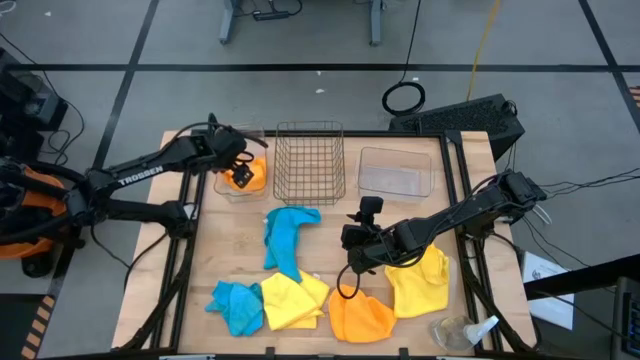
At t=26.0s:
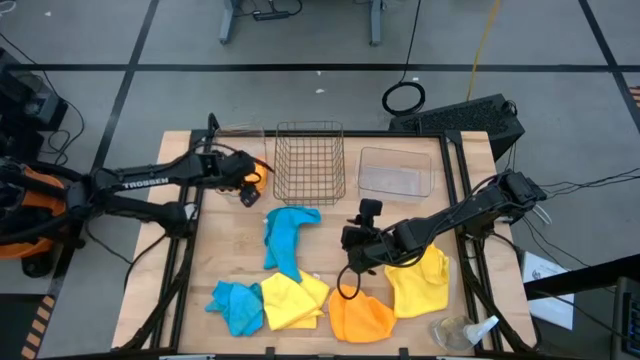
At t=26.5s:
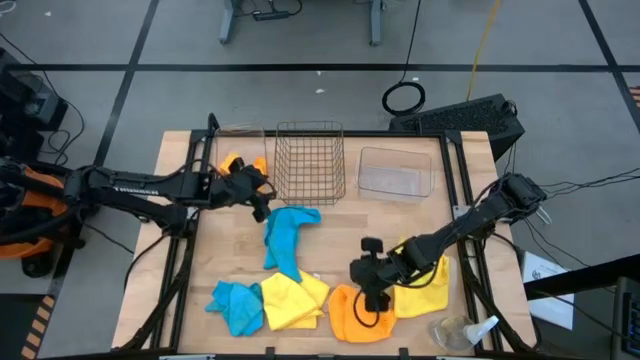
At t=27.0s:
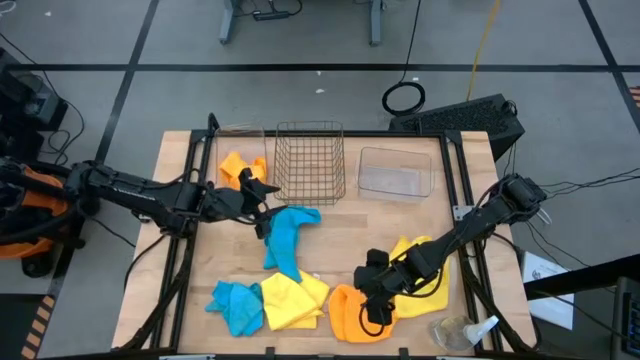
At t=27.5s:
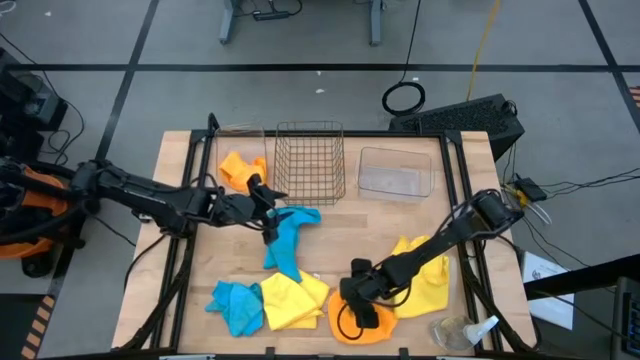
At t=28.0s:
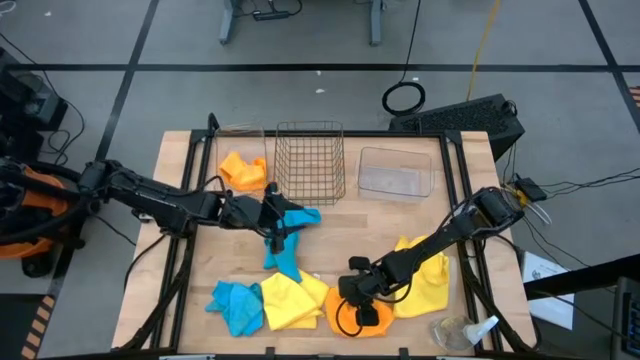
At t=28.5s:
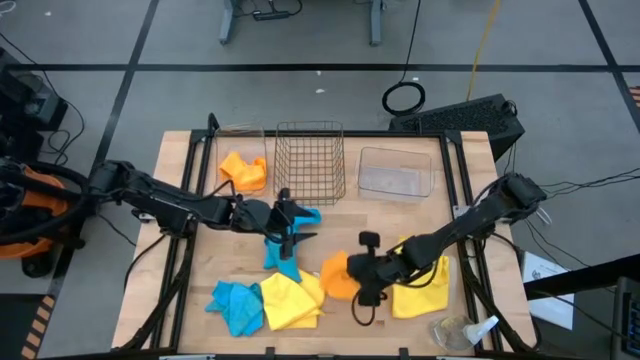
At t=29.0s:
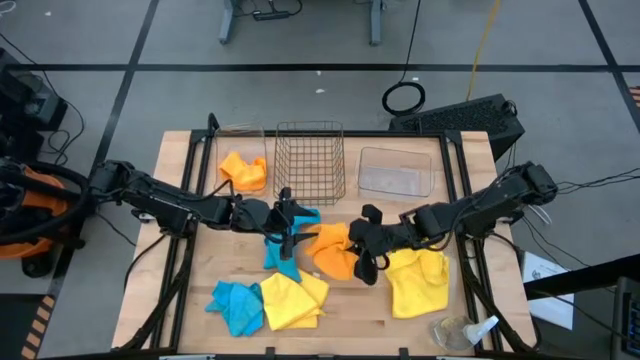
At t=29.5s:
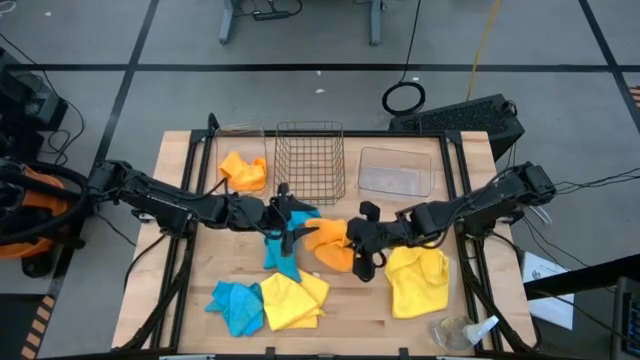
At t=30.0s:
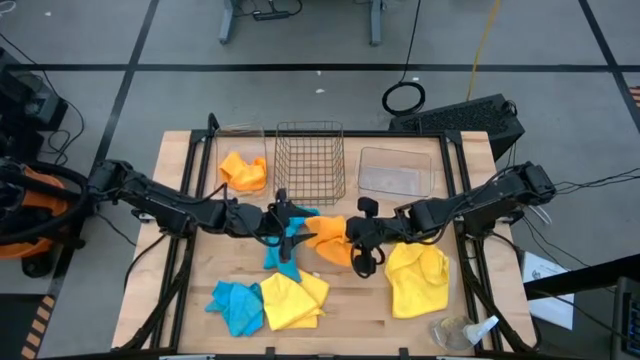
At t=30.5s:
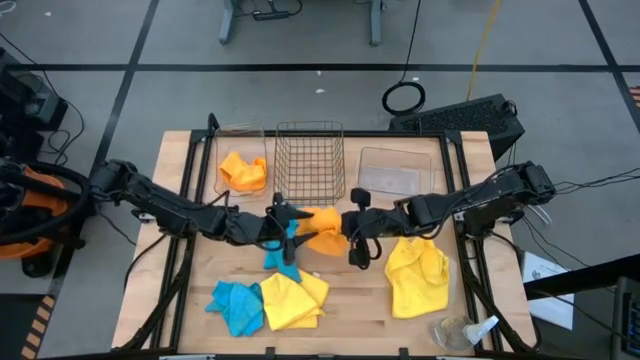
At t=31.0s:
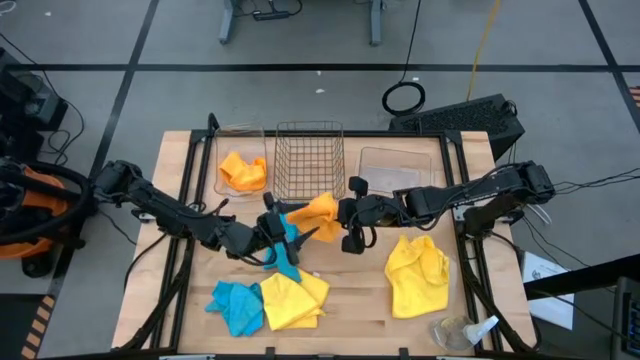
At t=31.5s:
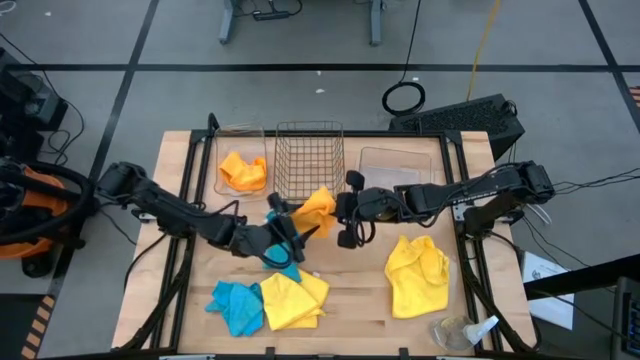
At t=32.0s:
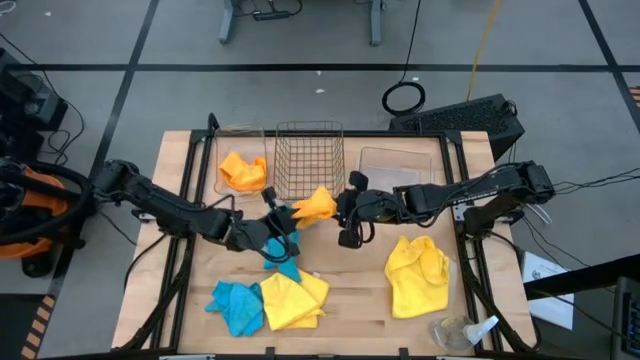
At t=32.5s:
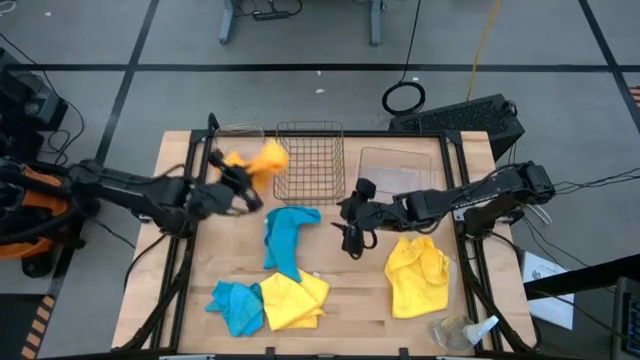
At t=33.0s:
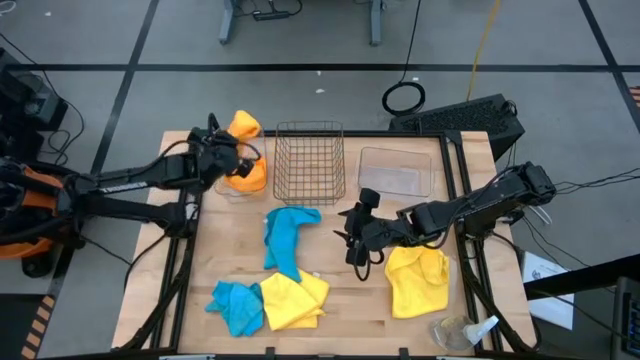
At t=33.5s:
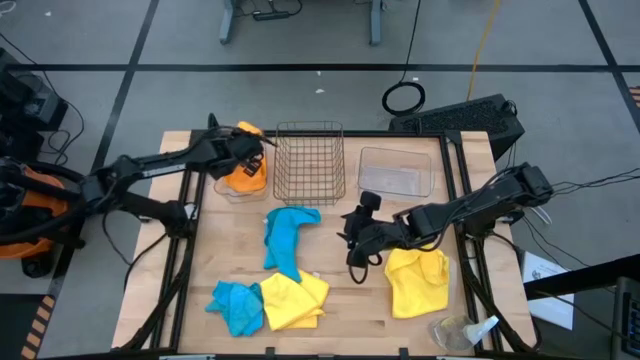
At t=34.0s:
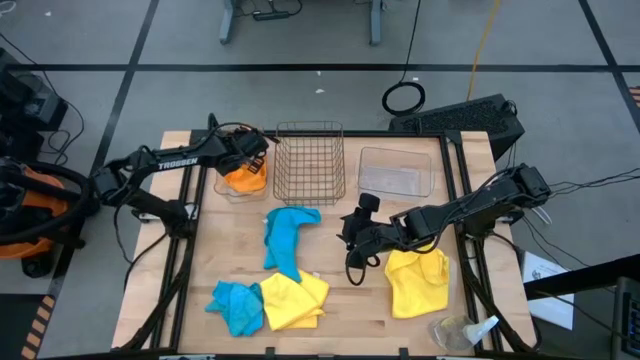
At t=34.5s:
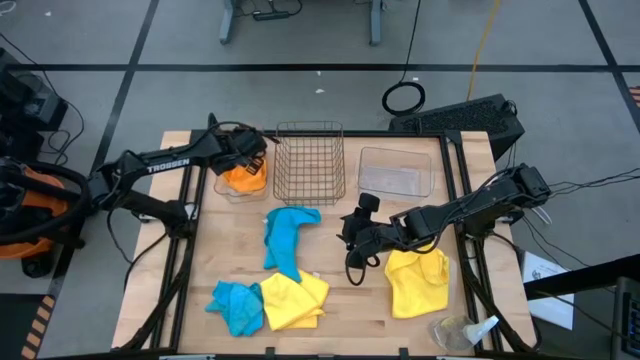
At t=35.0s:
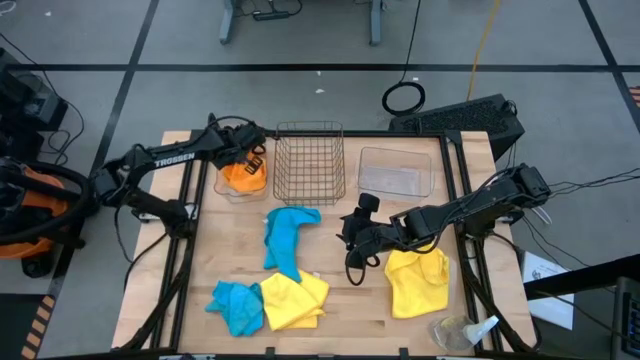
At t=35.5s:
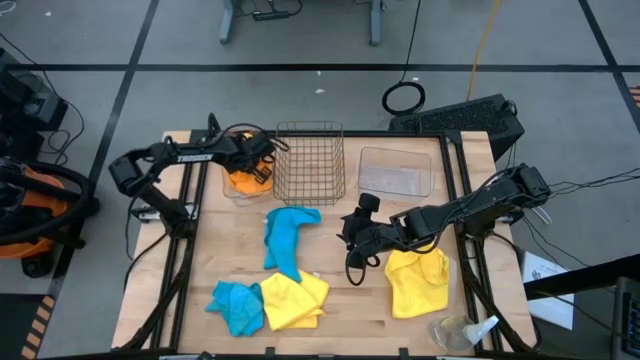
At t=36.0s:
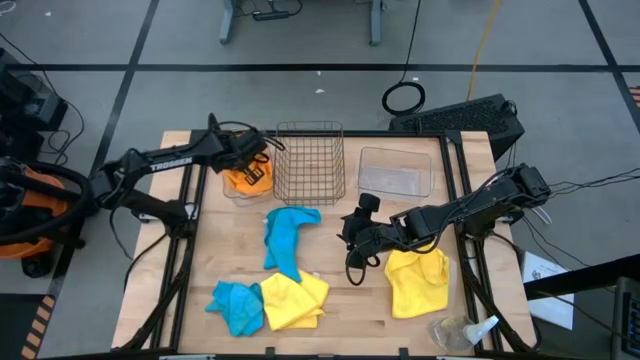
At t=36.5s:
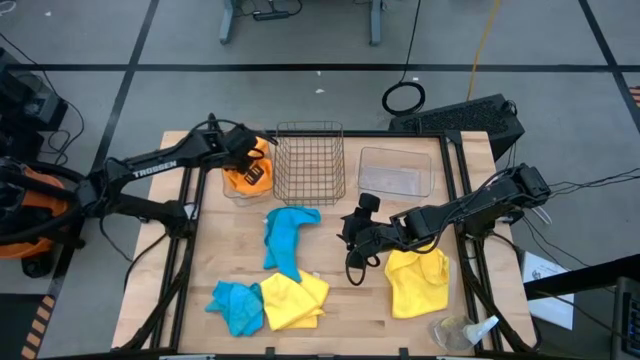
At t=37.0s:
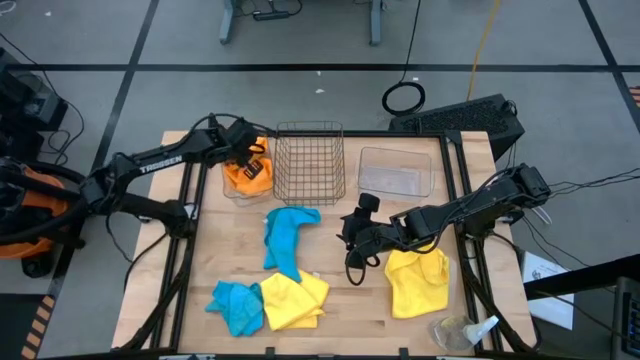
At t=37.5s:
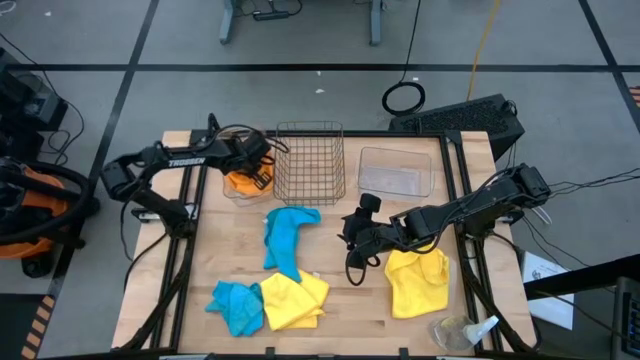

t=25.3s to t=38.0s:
Task: Sort microfiber towel by color & place in baskets
Put the orange microfiber cloth into the left transparent bin

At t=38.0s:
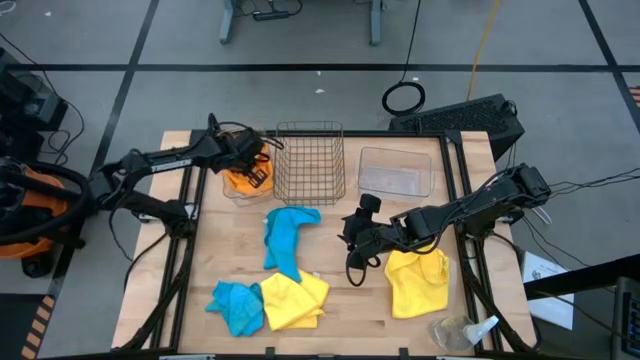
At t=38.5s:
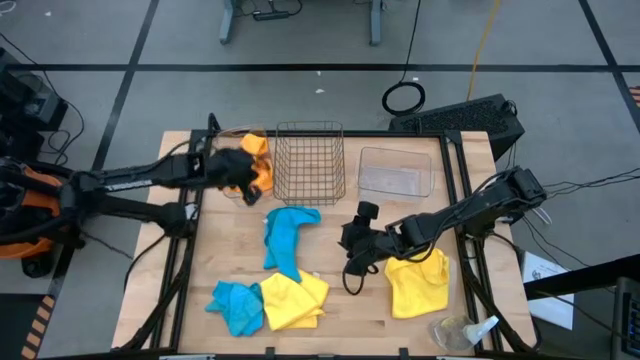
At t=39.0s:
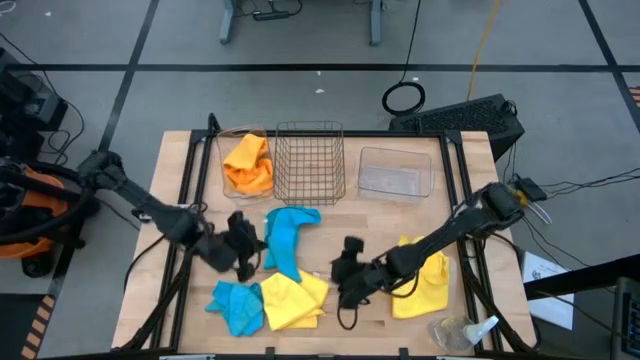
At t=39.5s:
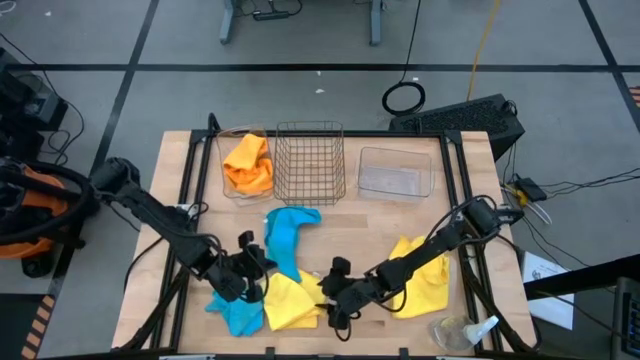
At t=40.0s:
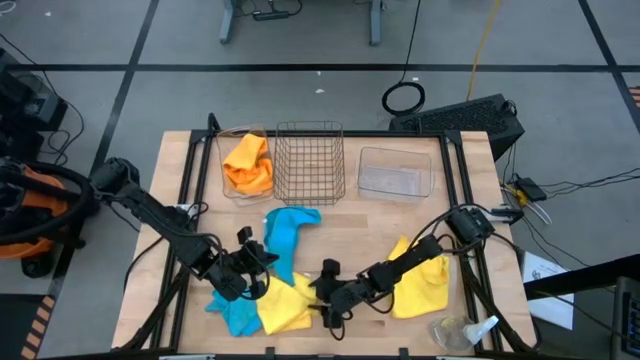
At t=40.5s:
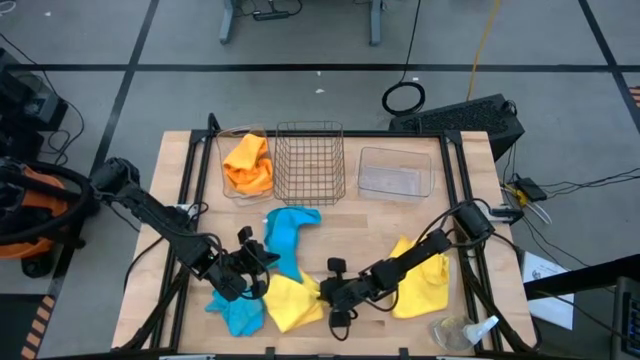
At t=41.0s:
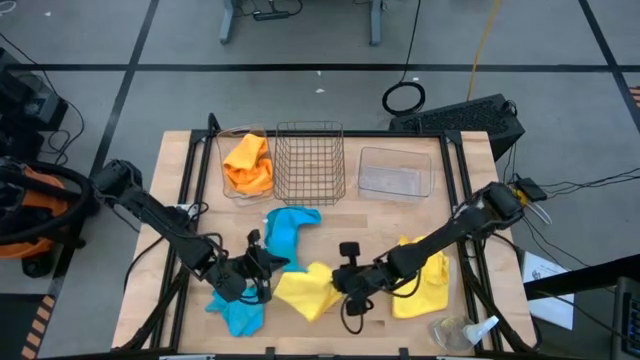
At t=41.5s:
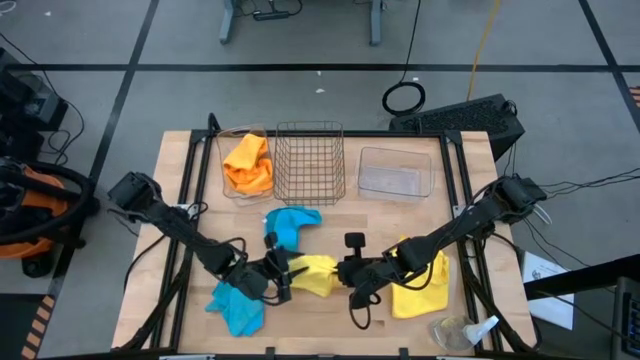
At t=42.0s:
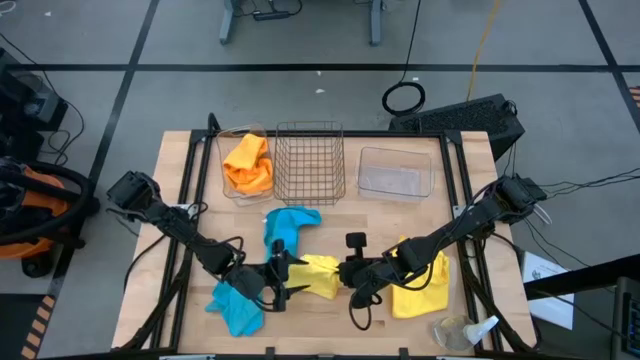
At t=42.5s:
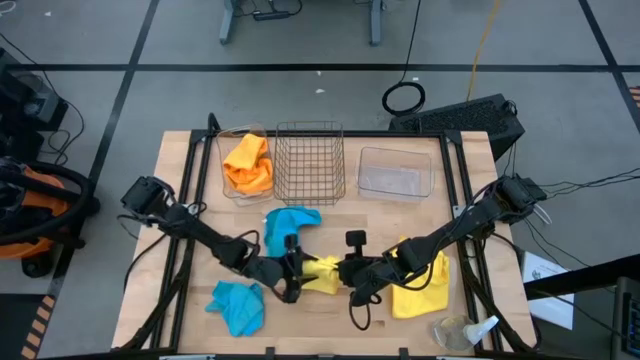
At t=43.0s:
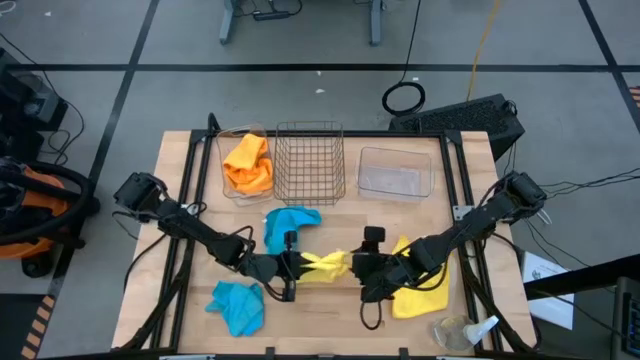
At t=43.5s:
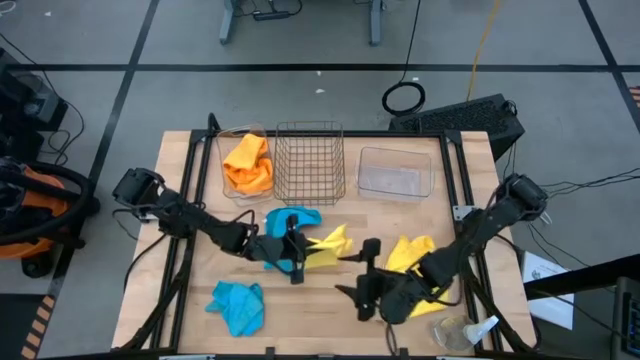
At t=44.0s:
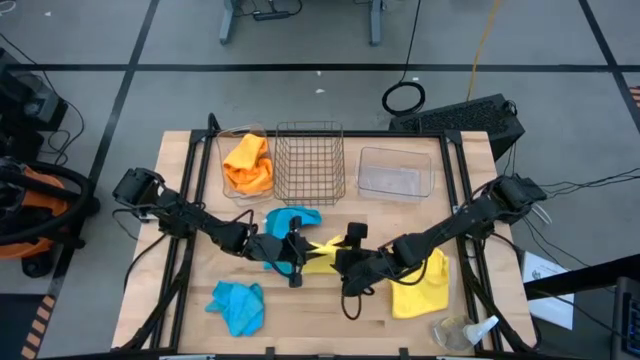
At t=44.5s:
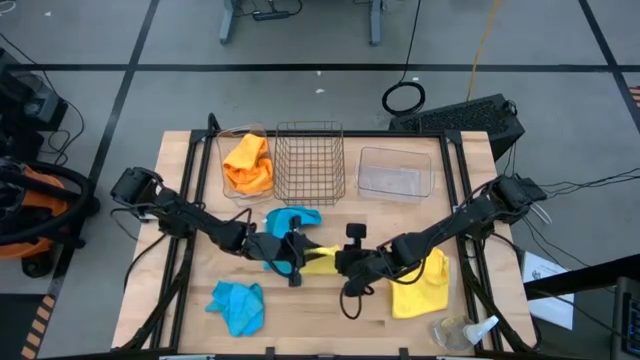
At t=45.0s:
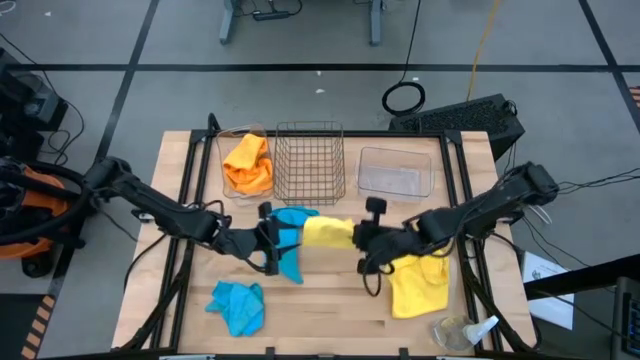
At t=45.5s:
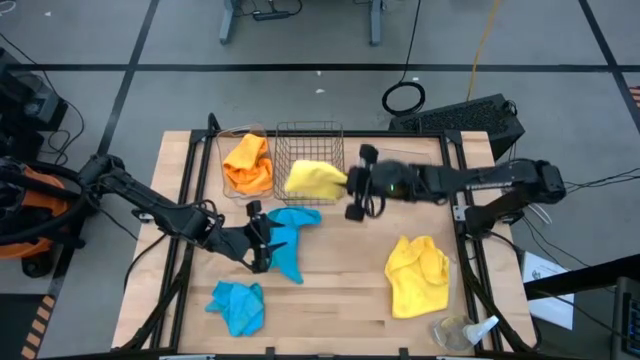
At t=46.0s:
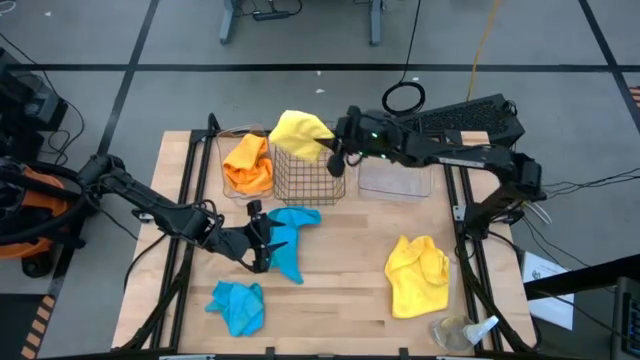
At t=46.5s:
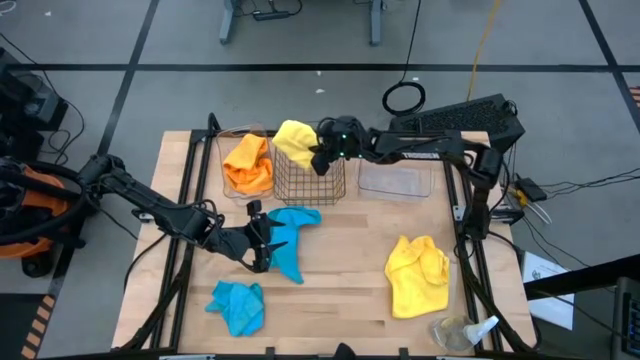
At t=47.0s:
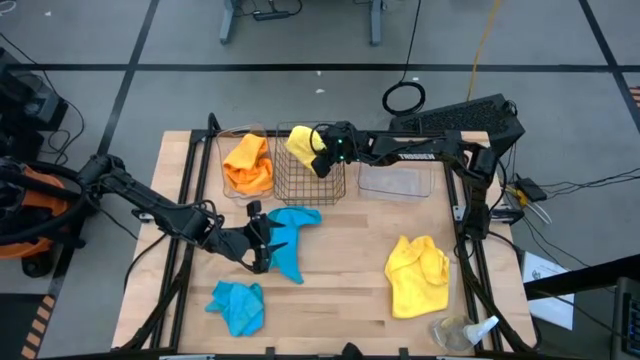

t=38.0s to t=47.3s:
Put the left yellow microfiber cloth into the wire basket
